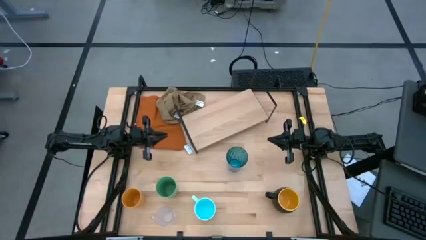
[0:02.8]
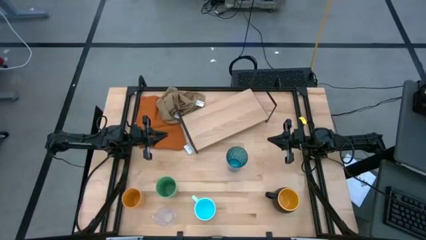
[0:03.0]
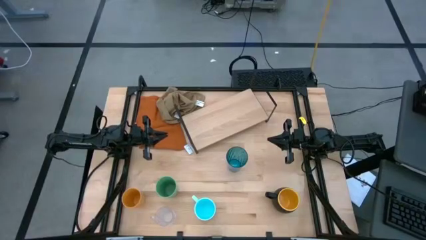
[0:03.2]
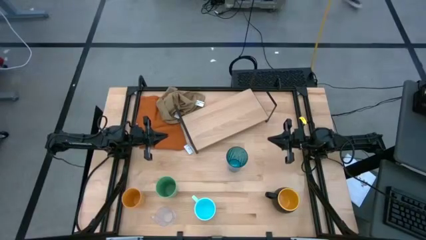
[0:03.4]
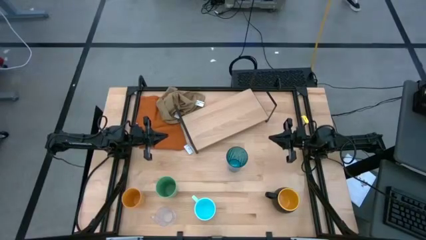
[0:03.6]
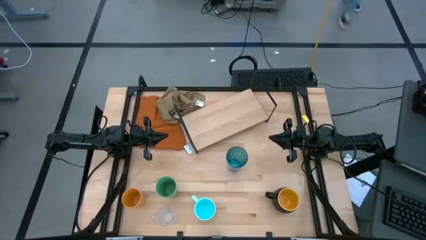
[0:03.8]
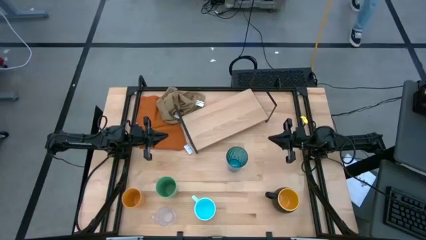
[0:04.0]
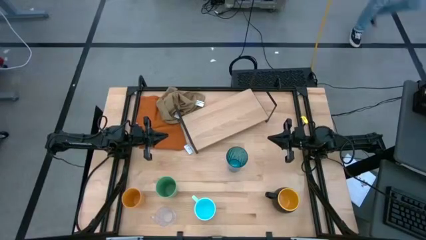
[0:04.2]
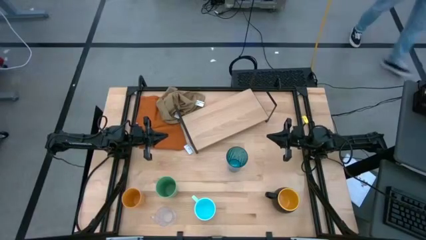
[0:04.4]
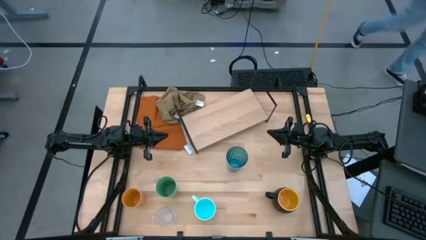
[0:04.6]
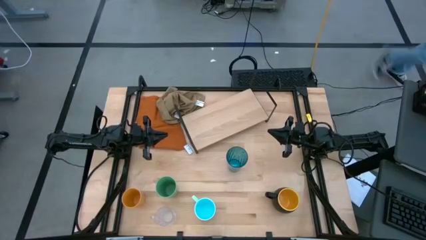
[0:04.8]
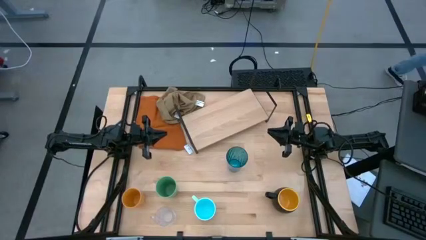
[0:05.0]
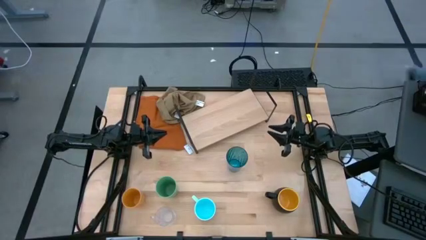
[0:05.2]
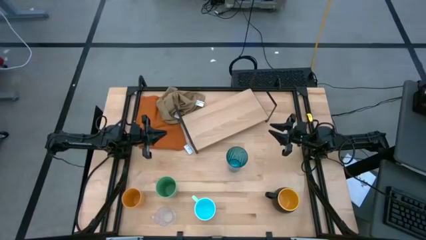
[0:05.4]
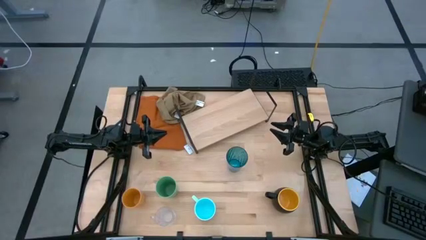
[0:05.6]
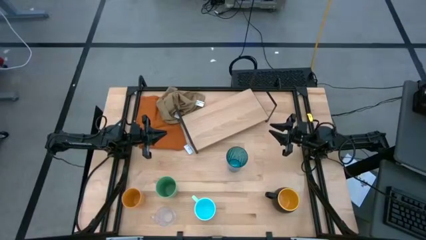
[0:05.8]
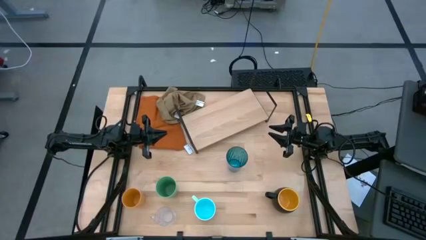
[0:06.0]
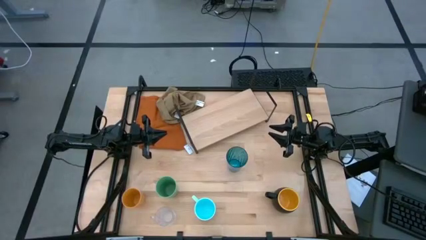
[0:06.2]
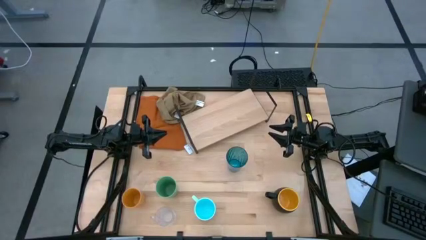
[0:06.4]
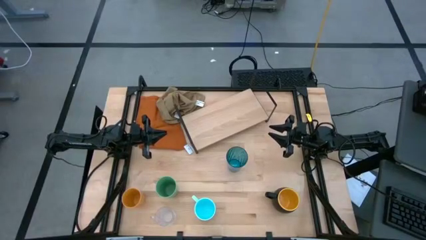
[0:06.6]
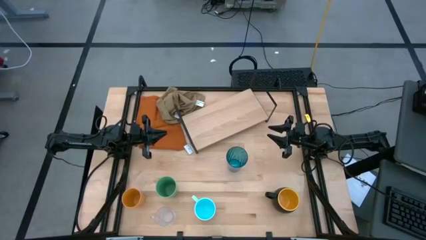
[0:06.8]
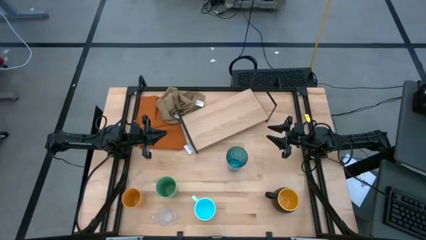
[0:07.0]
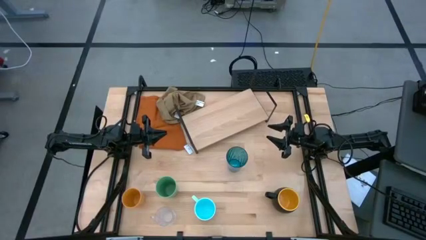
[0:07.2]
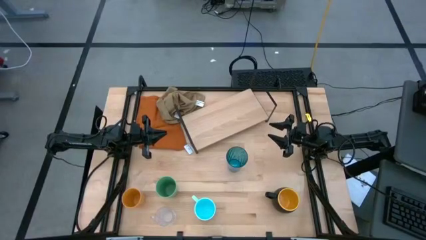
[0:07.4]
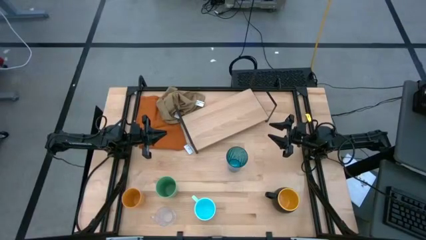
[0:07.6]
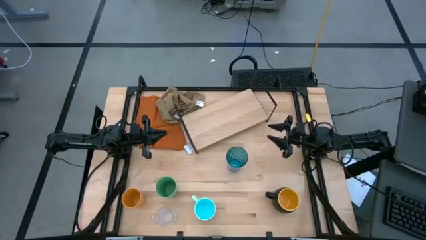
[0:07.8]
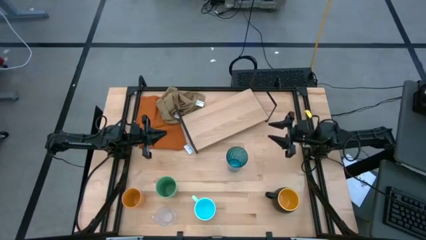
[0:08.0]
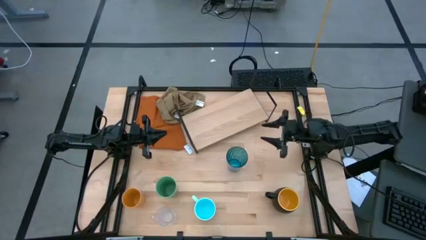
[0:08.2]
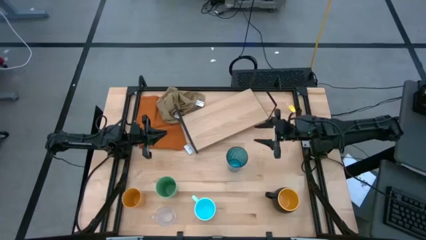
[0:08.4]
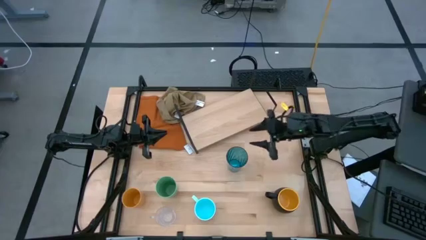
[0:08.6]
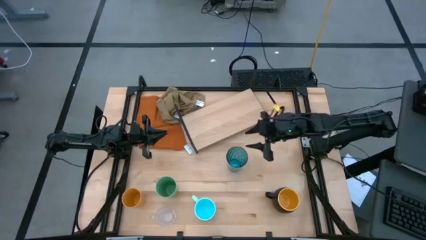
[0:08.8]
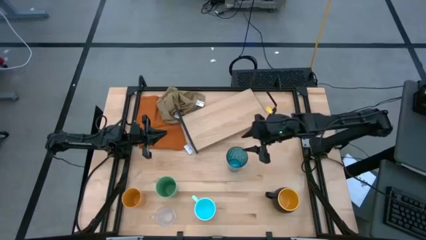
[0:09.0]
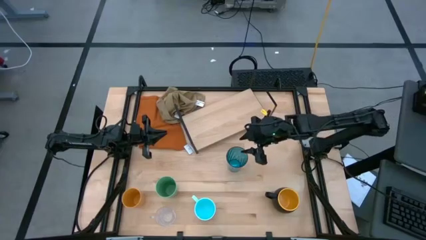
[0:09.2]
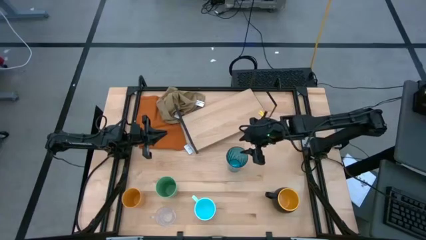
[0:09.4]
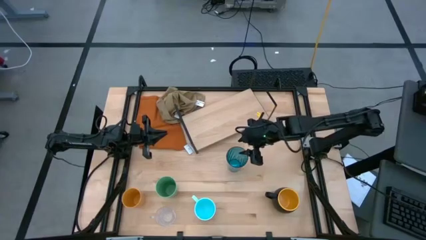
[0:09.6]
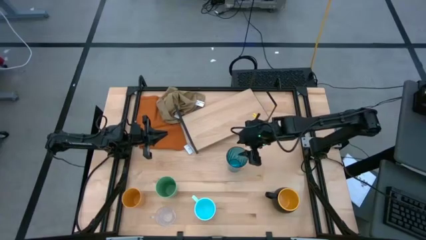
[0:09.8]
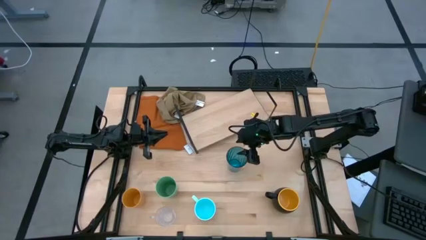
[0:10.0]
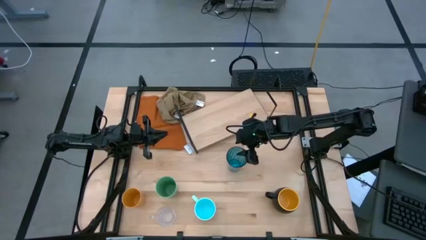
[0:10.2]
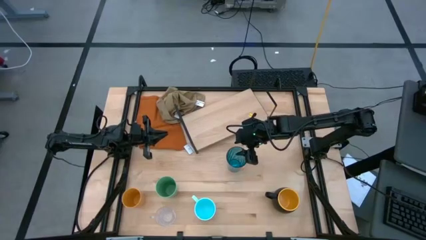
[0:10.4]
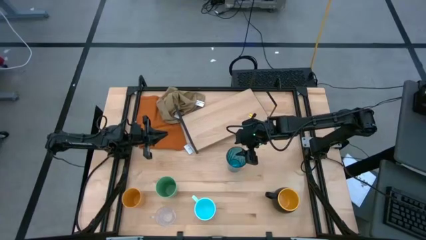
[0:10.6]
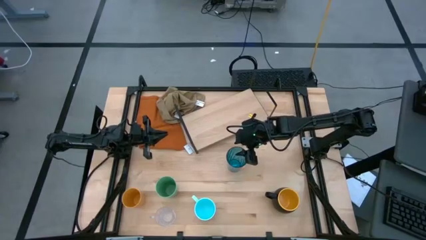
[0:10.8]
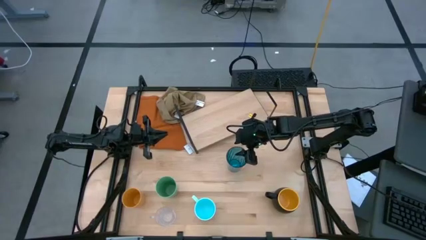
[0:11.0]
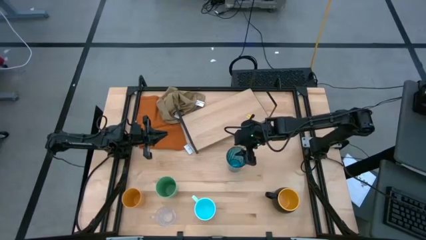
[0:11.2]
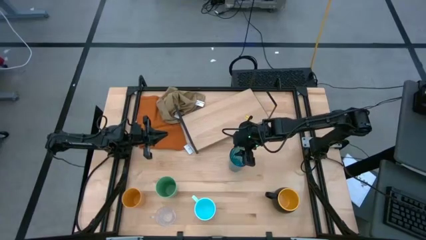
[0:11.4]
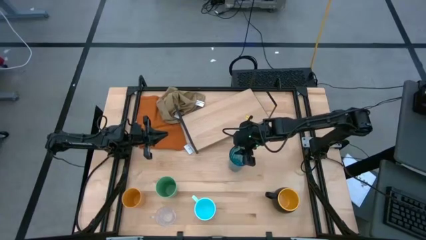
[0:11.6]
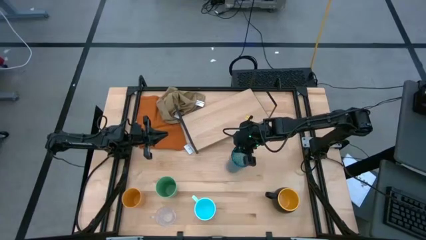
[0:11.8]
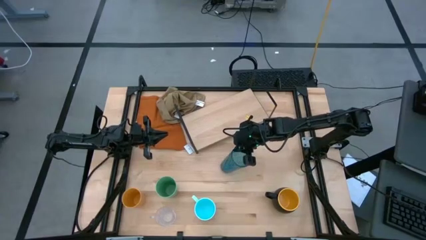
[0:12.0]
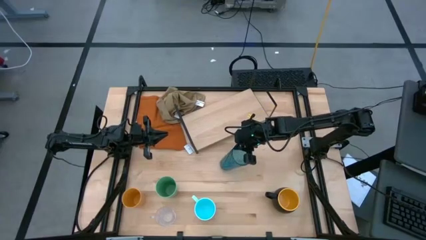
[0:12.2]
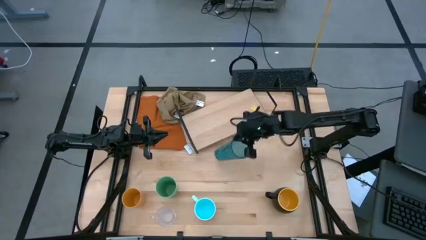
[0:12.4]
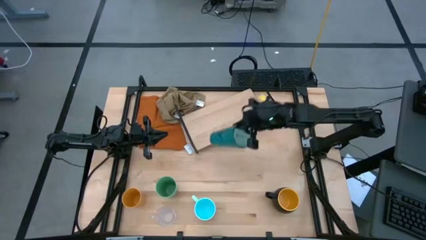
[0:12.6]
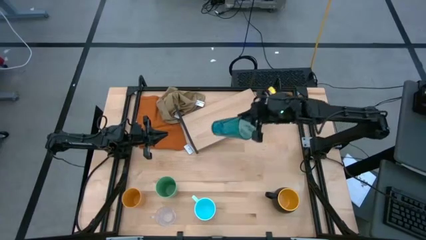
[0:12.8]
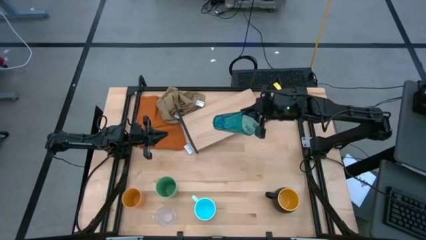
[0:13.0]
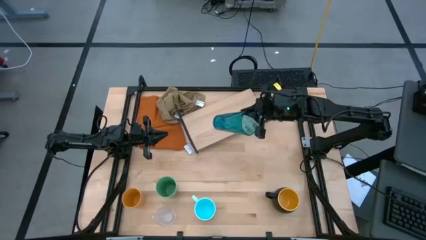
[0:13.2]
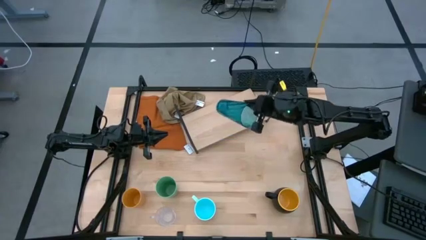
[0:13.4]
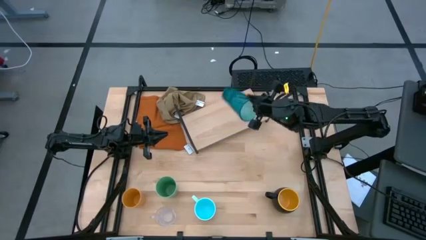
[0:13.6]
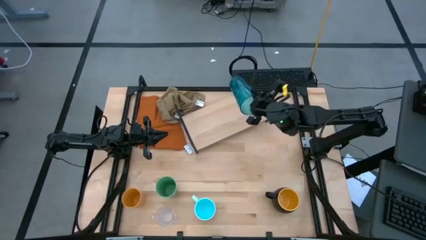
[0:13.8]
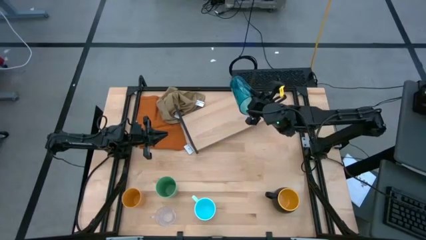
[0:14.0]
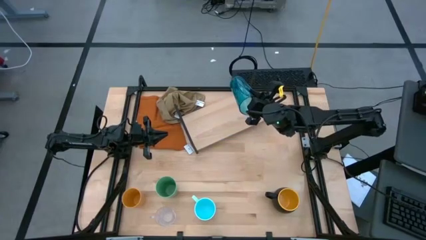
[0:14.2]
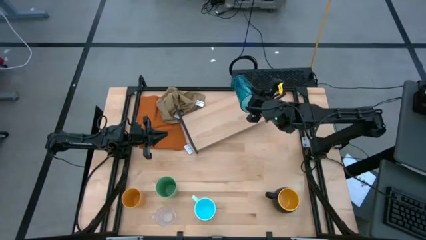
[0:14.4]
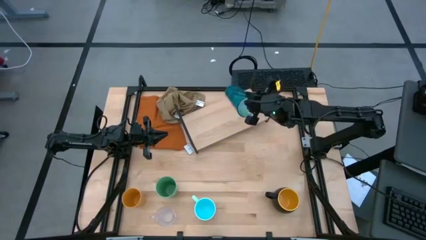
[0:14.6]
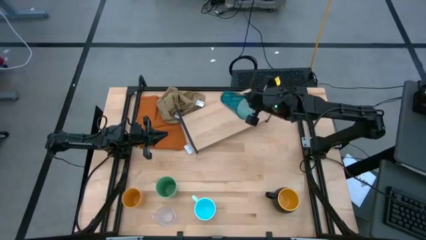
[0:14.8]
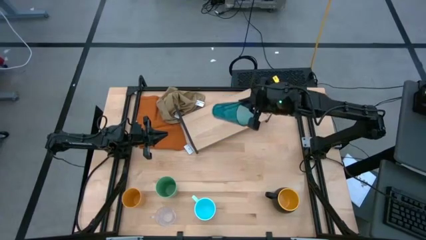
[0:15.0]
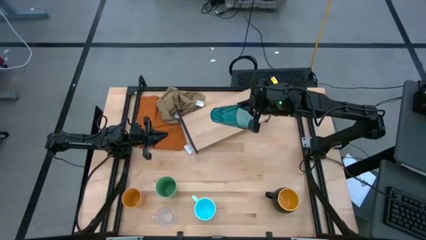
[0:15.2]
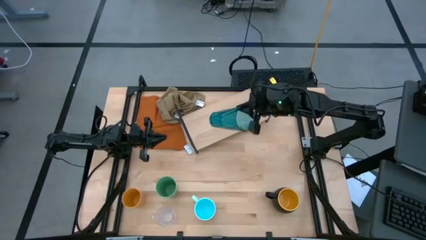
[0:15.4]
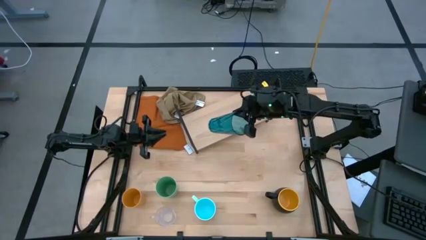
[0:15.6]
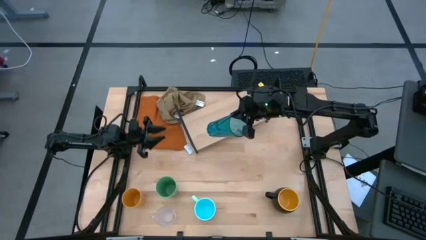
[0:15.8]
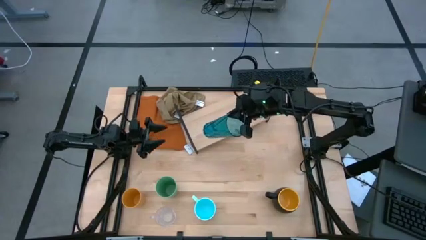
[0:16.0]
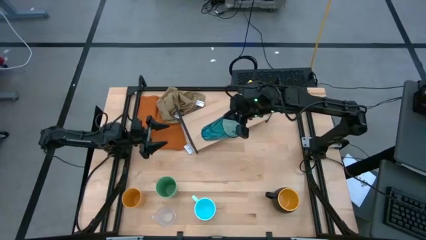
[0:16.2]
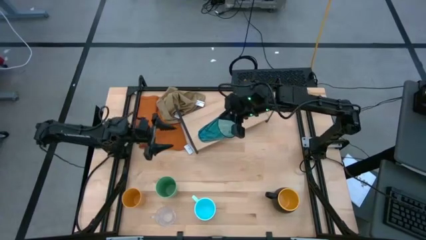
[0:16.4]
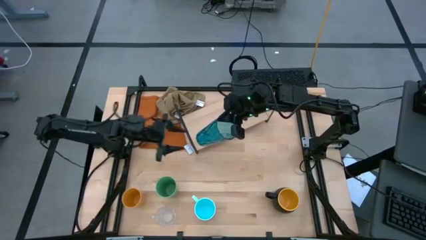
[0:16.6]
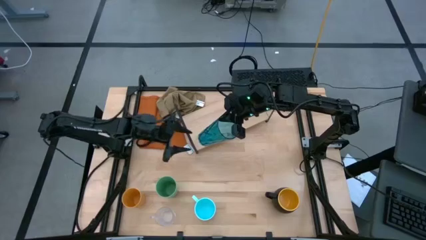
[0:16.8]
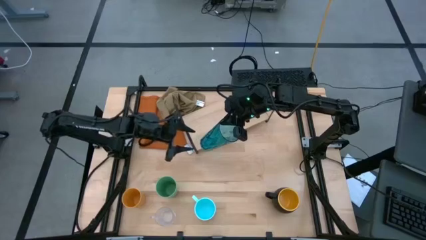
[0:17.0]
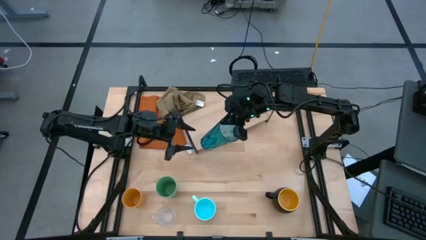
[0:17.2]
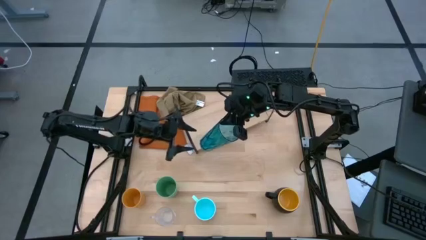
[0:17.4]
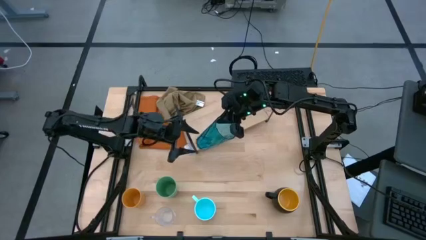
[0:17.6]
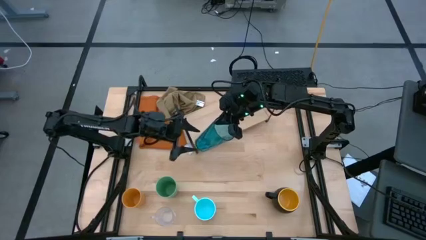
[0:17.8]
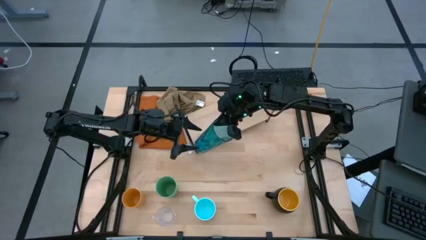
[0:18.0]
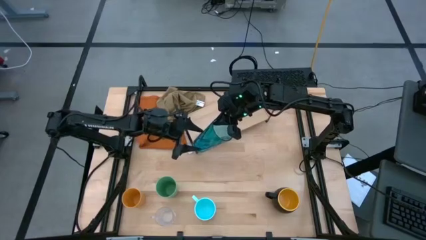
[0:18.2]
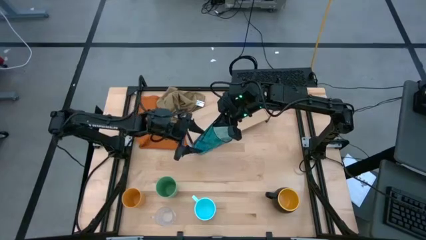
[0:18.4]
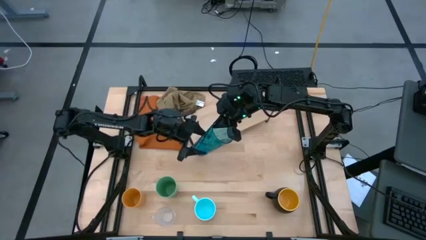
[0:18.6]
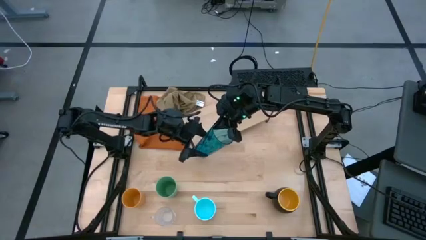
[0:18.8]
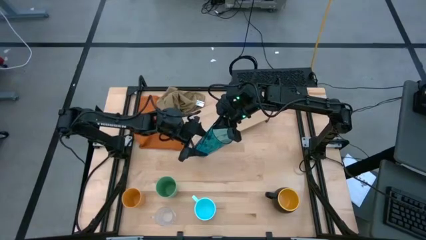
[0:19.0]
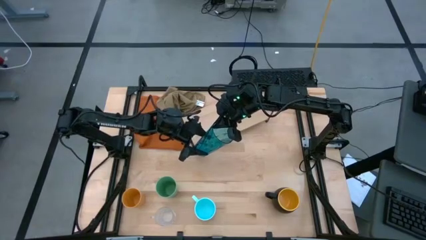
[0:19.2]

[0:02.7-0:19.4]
Task: Stack small to large cups/mugs on shelf
Put the blue cup on the shelf
